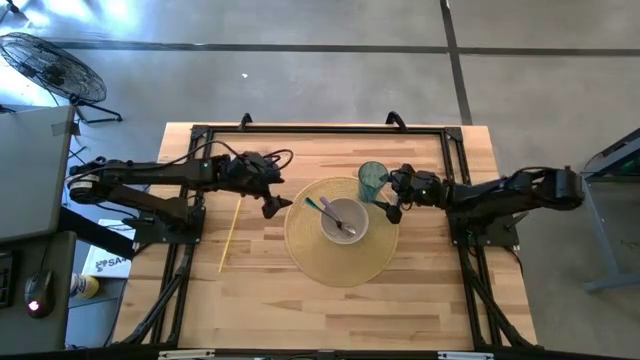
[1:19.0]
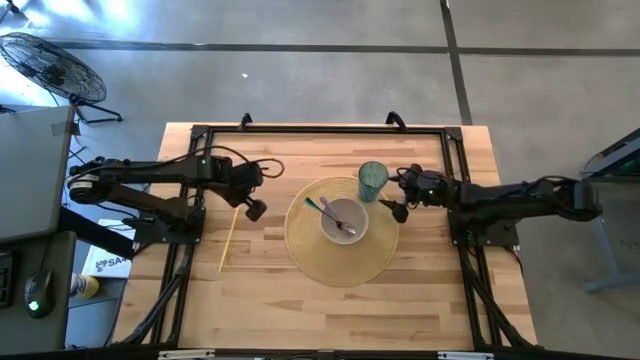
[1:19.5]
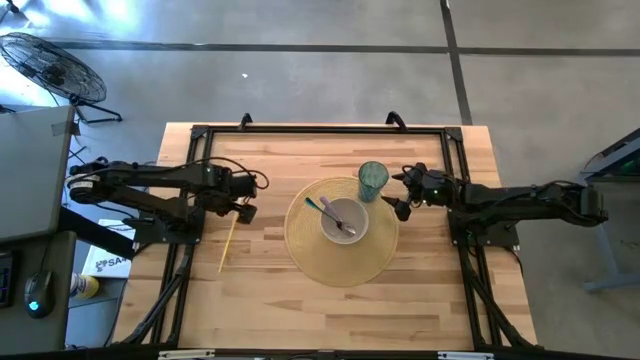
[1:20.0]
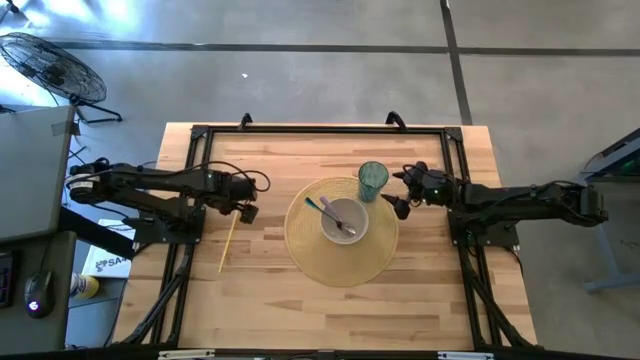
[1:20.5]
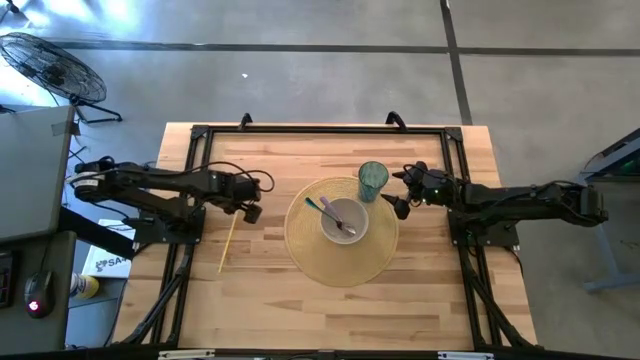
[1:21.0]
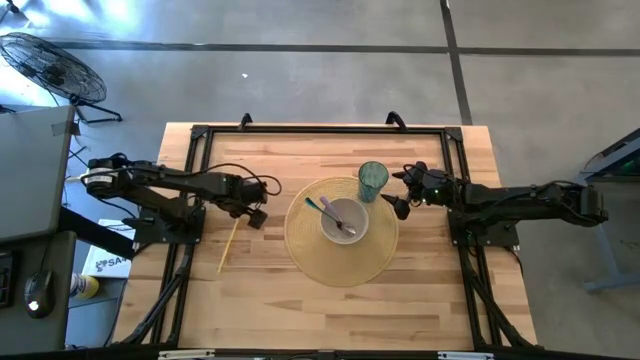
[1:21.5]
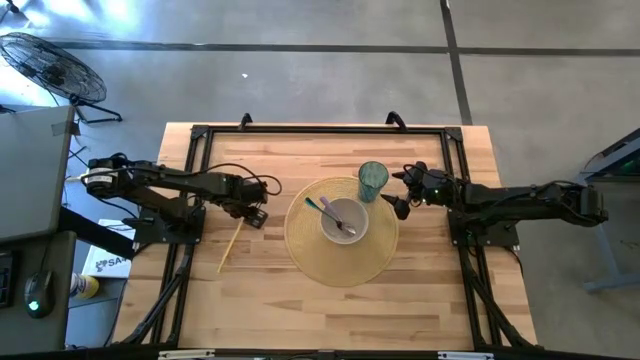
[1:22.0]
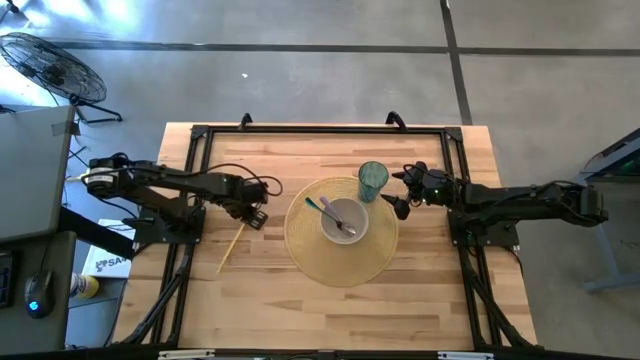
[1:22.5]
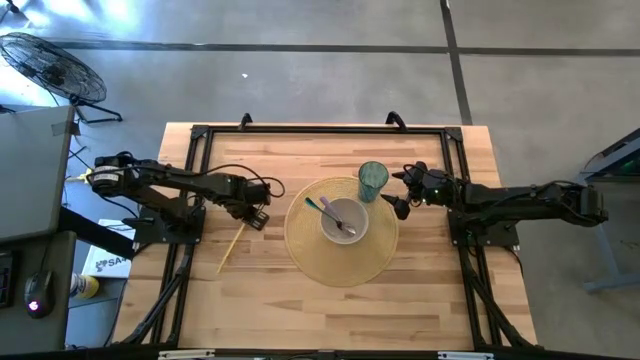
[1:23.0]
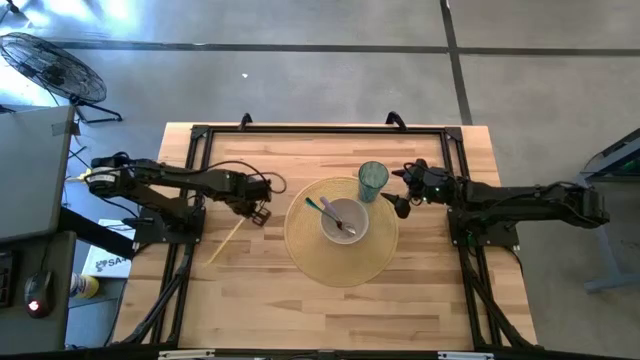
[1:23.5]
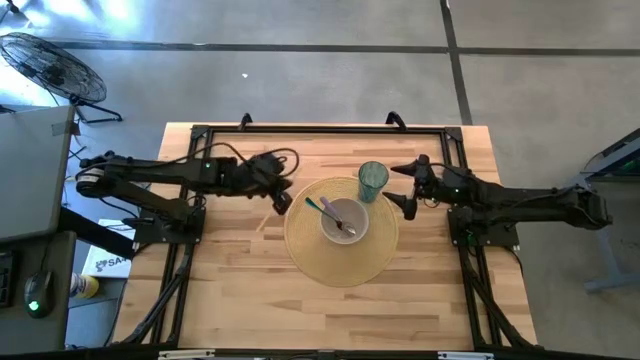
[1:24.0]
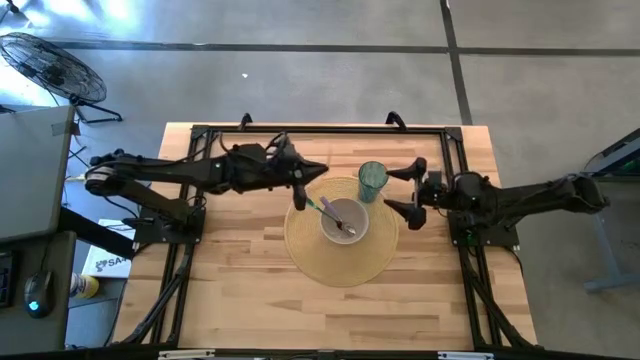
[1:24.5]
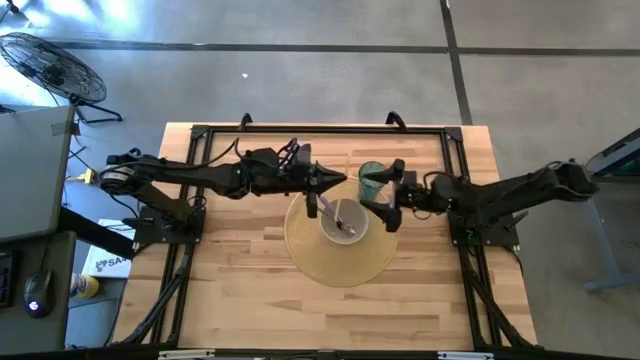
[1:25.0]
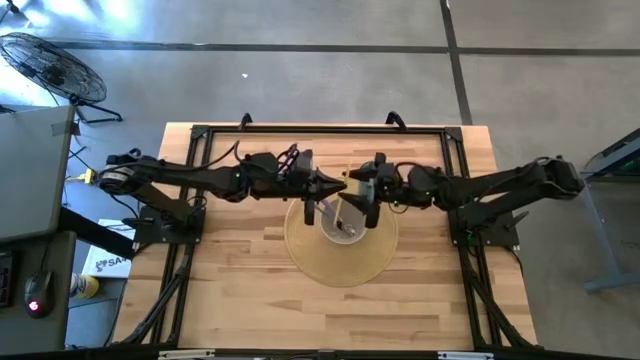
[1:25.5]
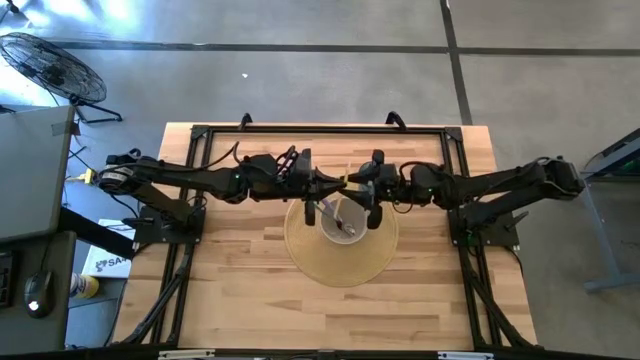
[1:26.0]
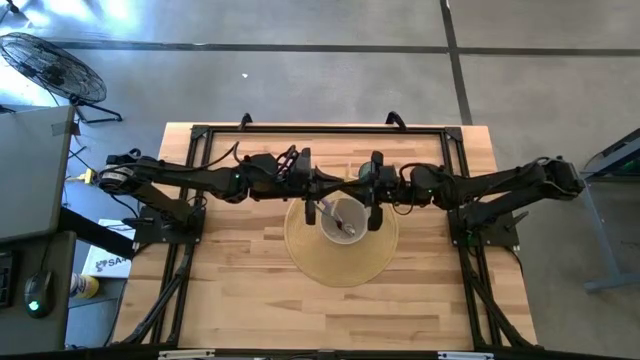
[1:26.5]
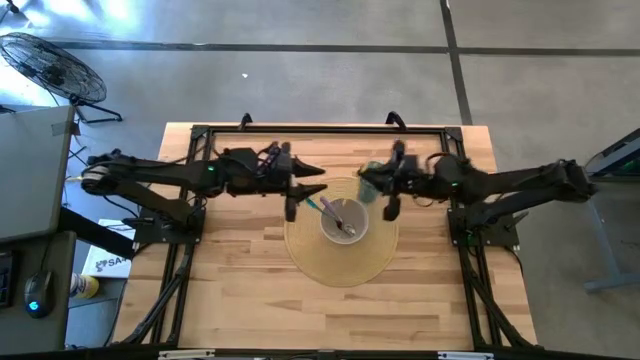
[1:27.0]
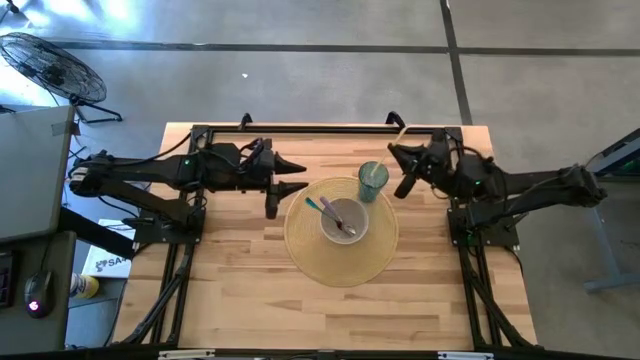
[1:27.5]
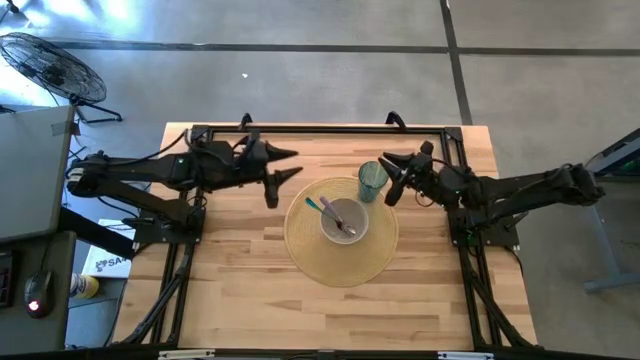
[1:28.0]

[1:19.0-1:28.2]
Task: Pick & Place Utensil
Put the yellow straw into the green cup on the table placemat

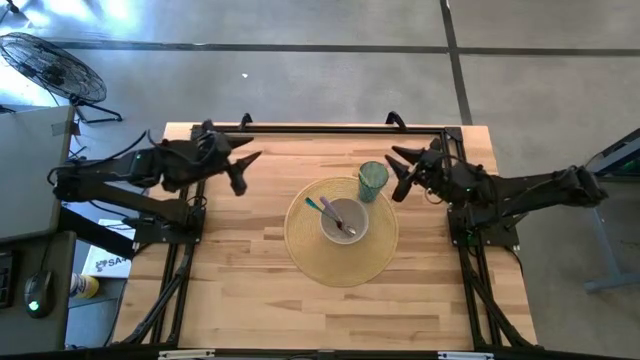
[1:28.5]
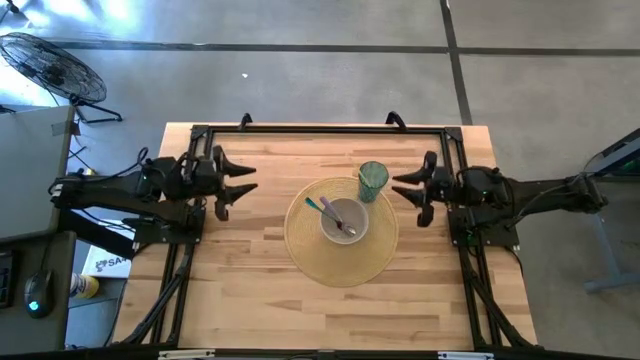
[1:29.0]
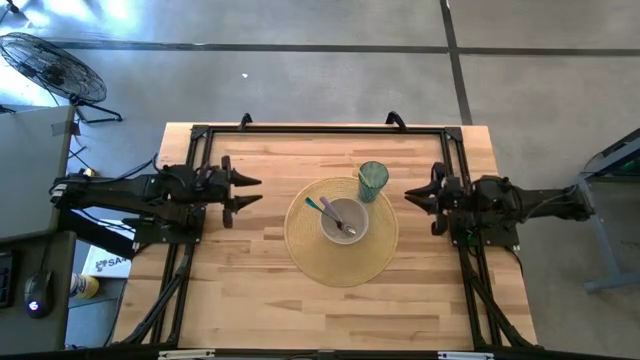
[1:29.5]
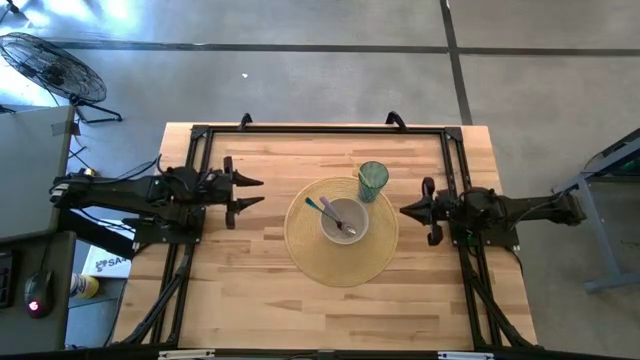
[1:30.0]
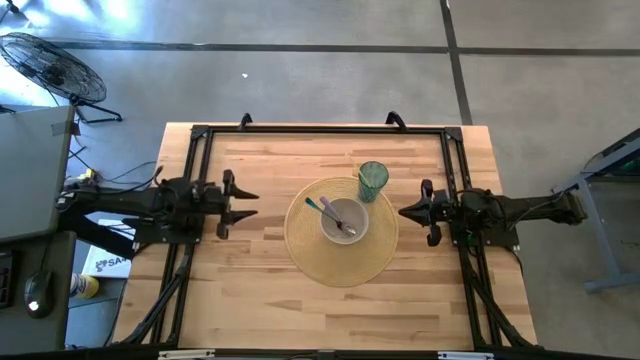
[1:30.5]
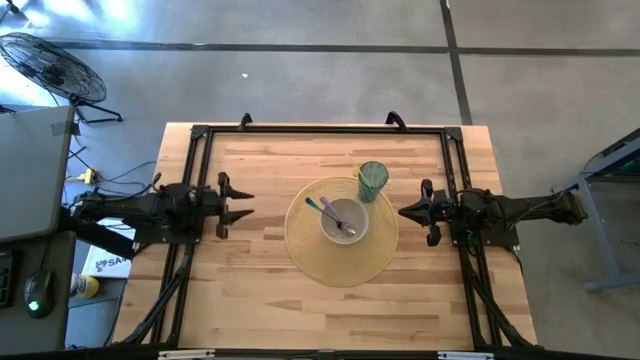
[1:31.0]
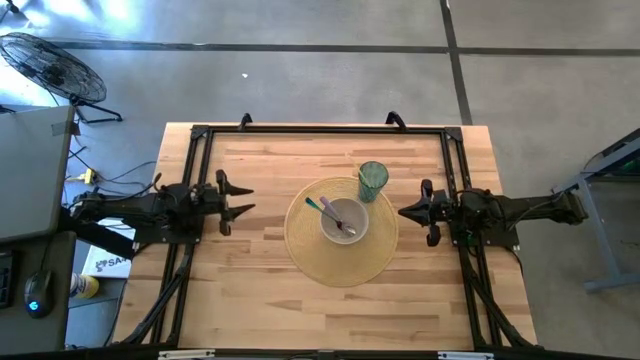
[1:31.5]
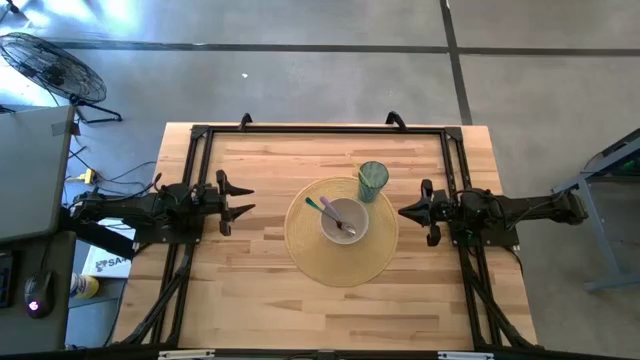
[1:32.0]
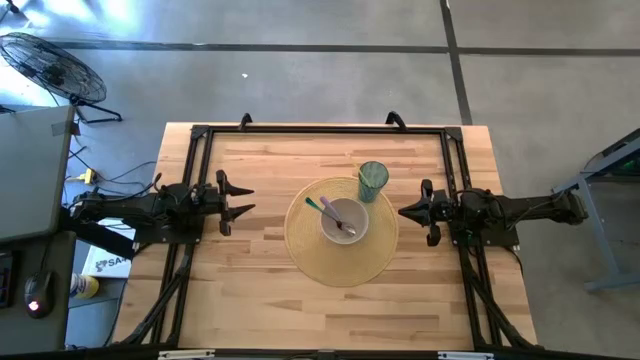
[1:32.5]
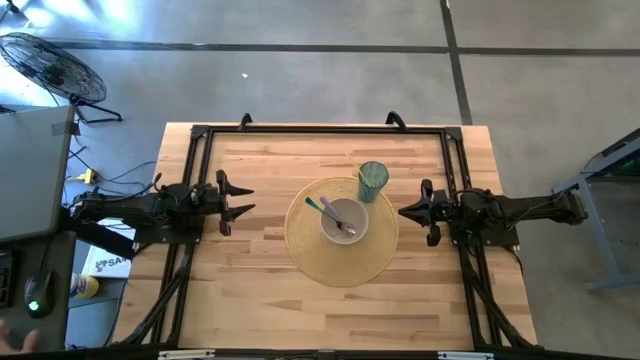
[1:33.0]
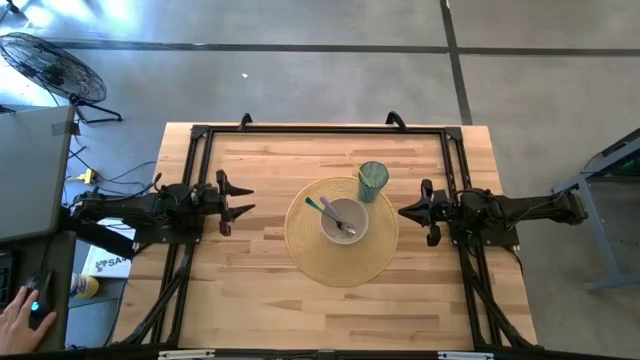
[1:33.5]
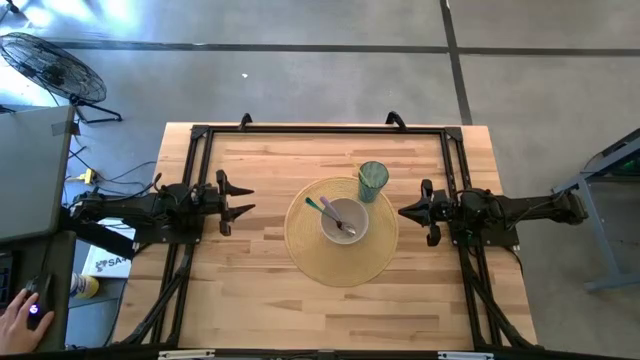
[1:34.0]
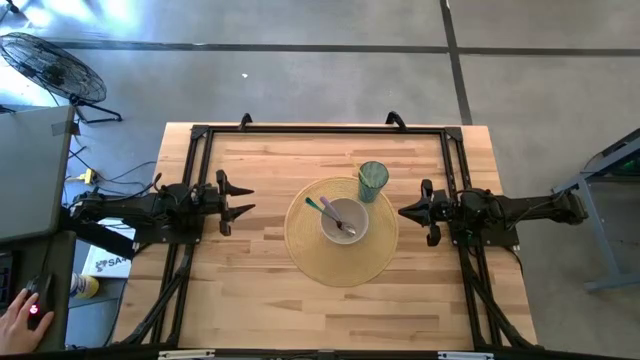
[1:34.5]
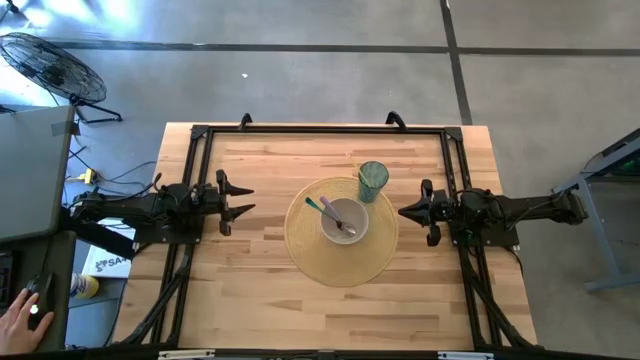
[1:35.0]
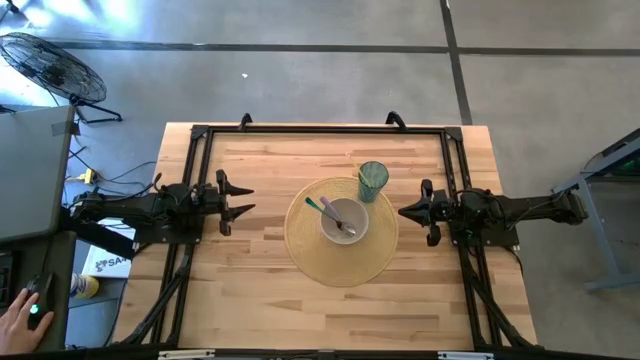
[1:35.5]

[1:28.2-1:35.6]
Return to Home Position

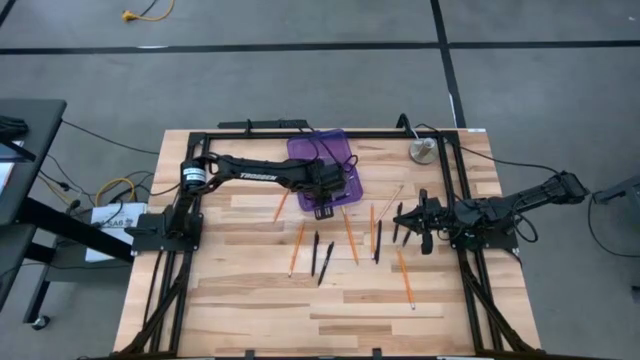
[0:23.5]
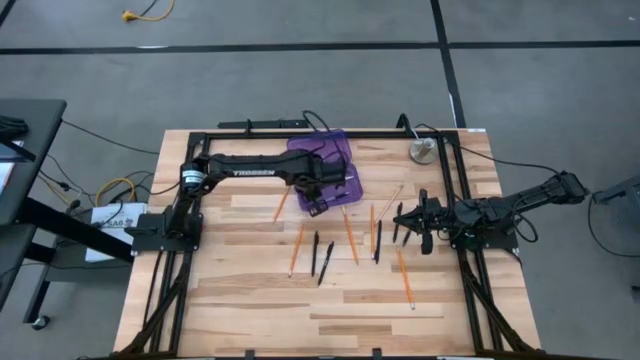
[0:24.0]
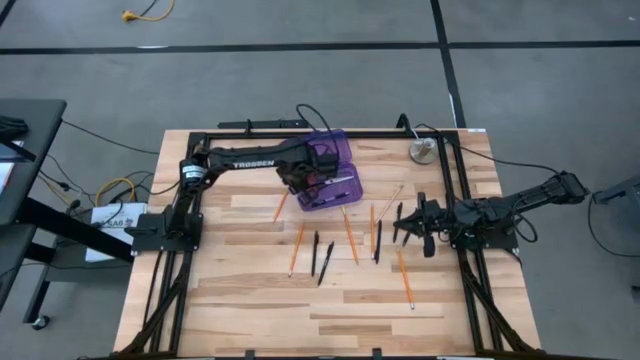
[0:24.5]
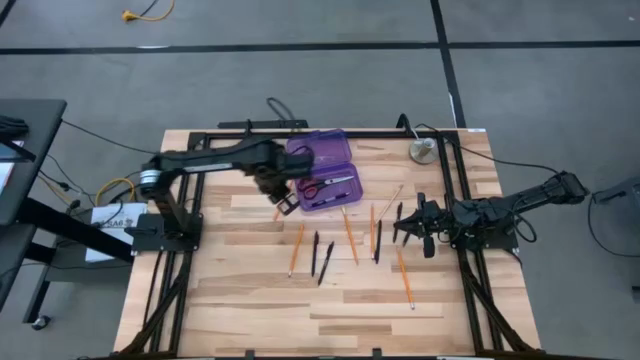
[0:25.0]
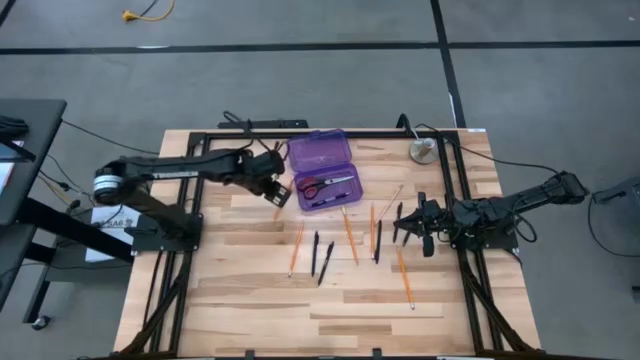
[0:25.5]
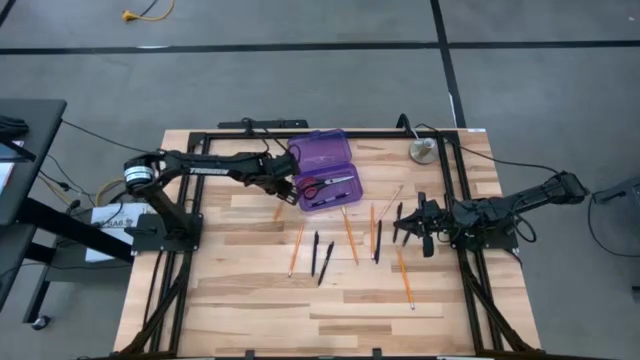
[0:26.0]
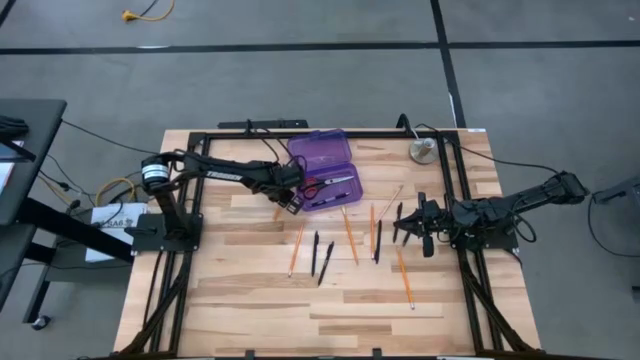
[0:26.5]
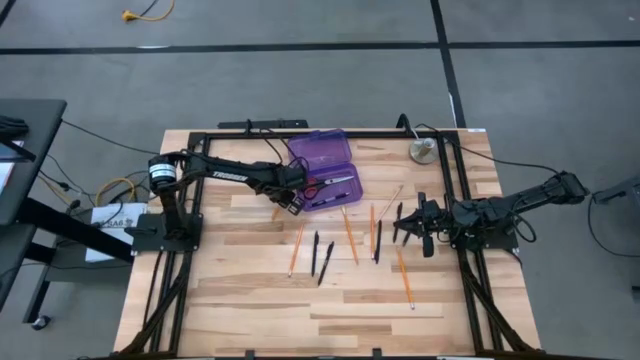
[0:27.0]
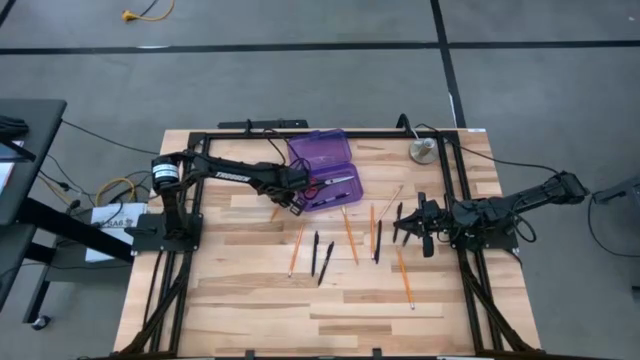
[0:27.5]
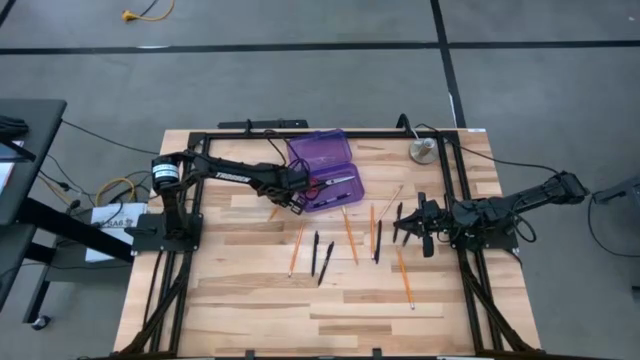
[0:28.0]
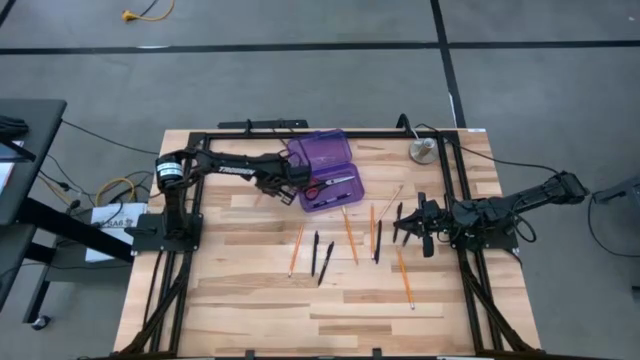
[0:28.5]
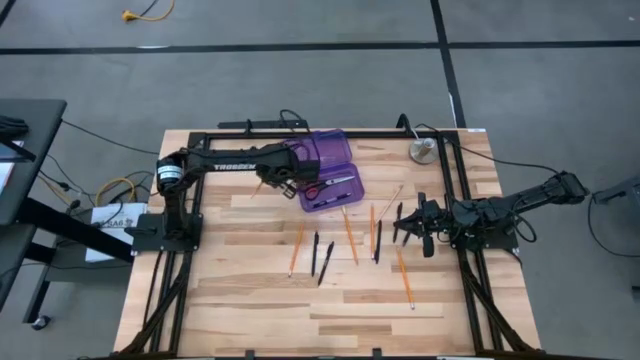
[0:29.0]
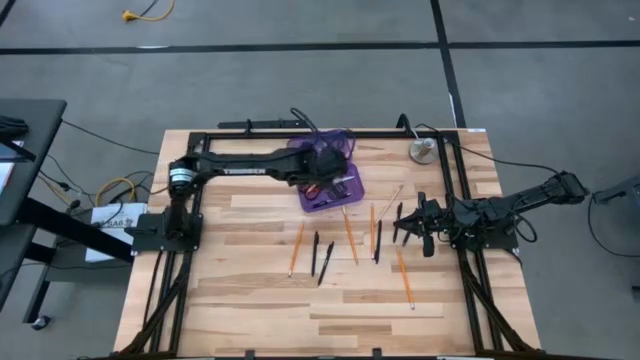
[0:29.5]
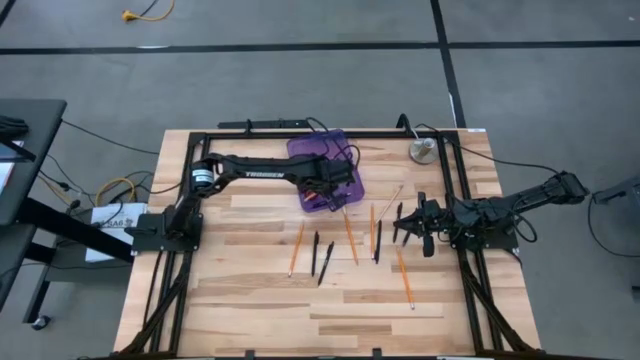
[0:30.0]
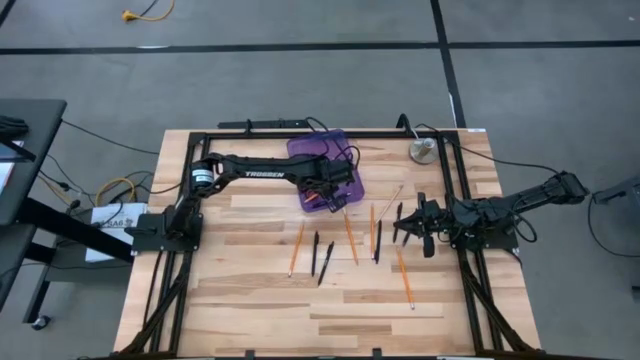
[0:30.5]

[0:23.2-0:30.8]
Task: Pick & place school supplies into a supply box
Put the yellow pencil into the purple supply box
